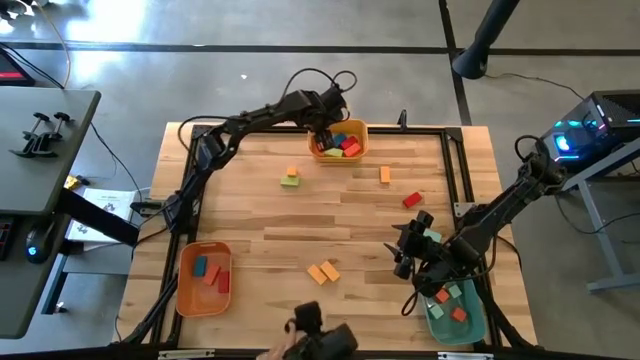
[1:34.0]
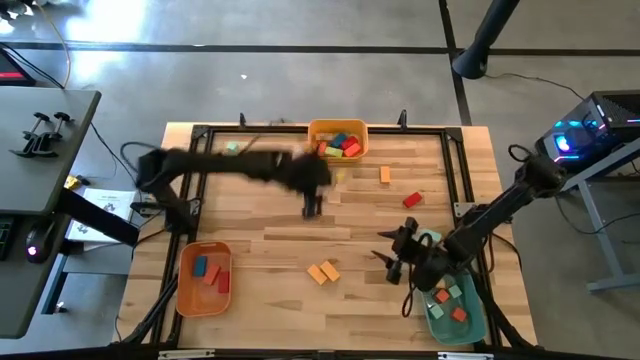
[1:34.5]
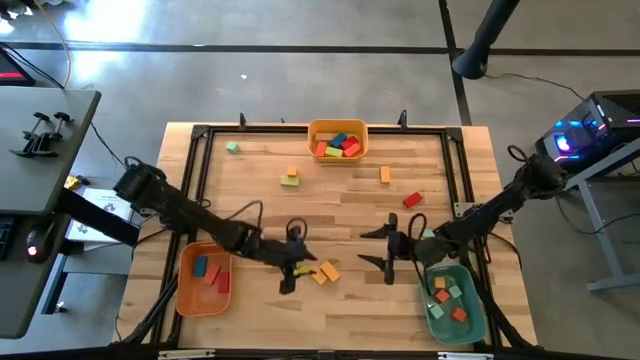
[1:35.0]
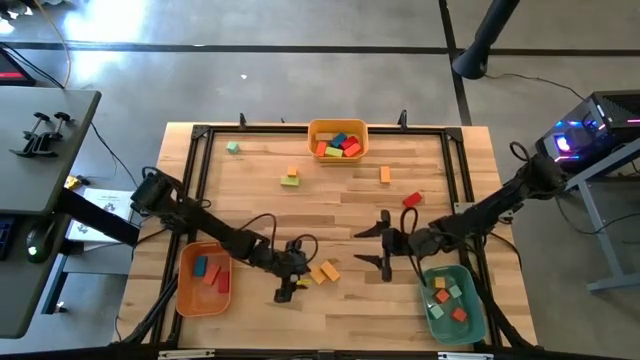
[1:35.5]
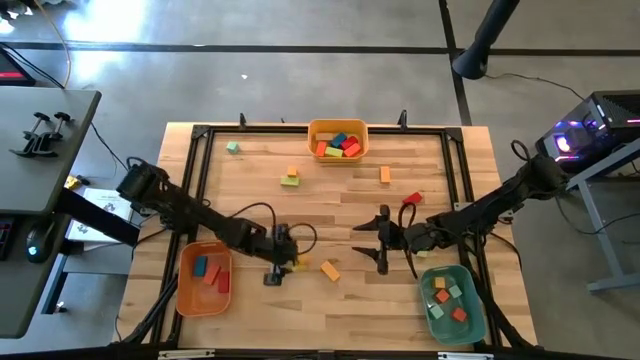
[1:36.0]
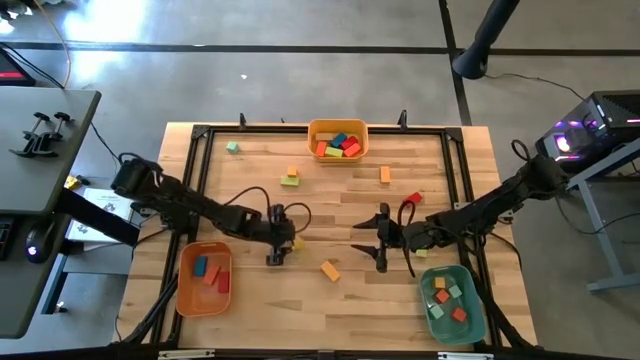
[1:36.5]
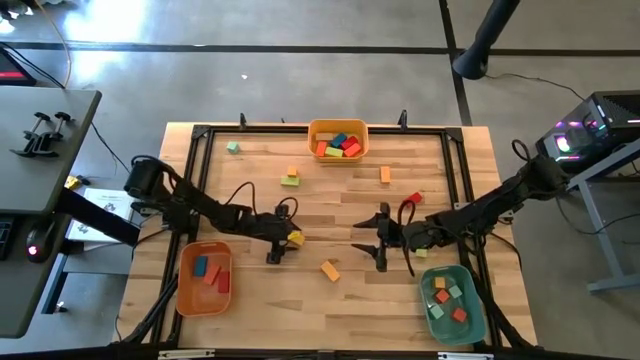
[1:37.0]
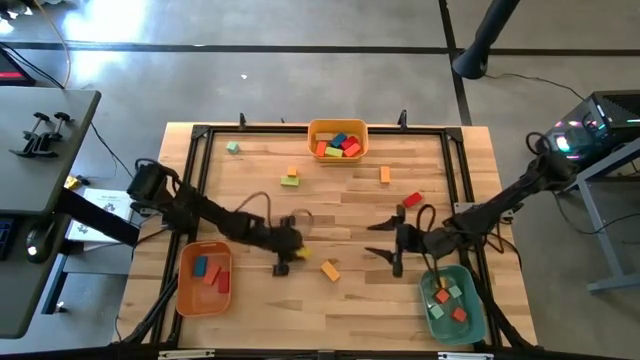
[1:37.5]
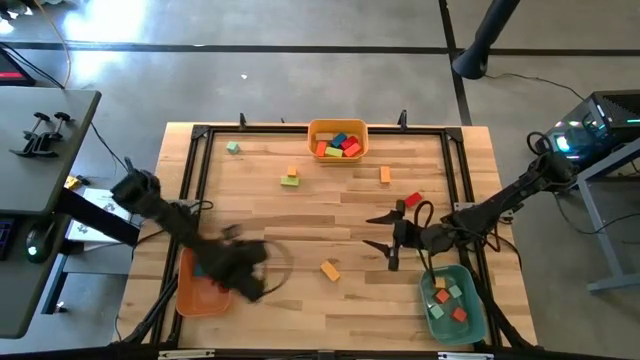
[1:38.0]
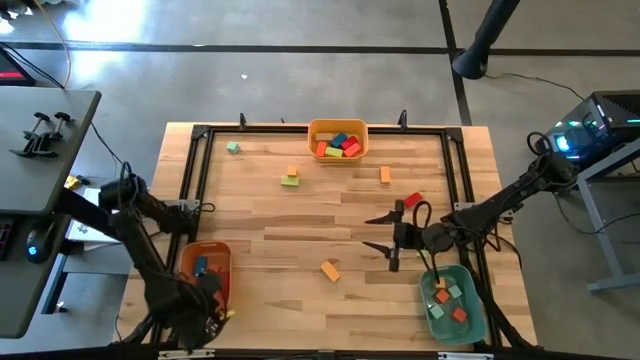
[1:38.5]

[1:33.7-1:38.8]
Task: Sort blocks by size
Put the bottom yellow narrow rectangular block into the orange bin

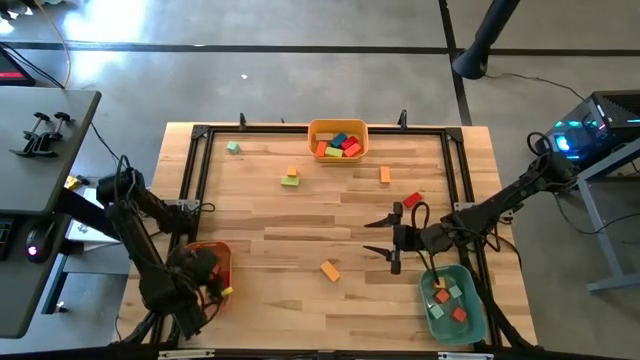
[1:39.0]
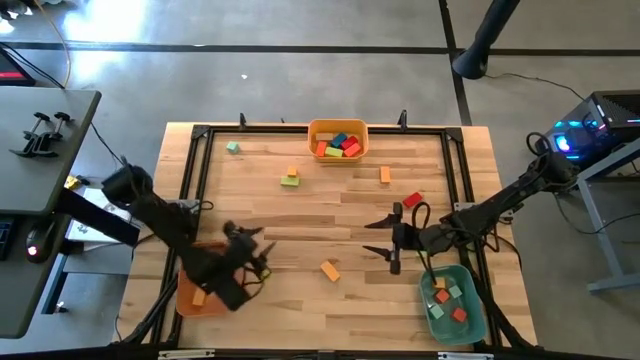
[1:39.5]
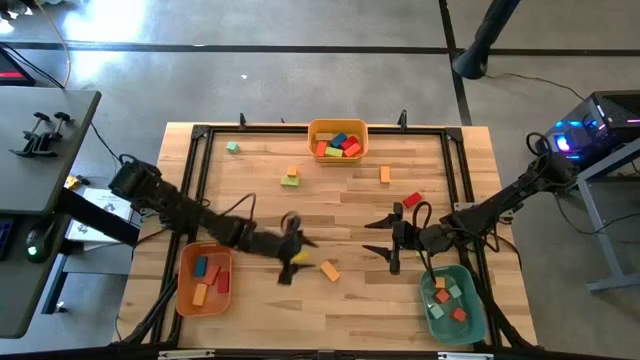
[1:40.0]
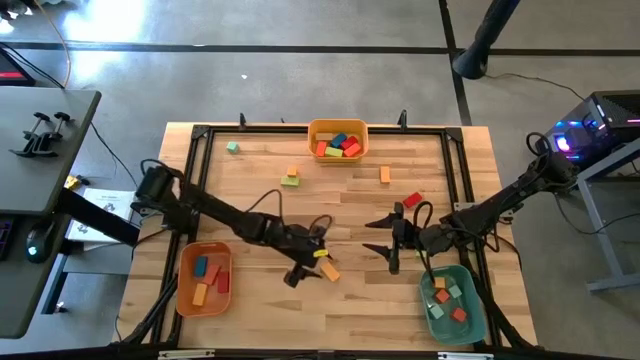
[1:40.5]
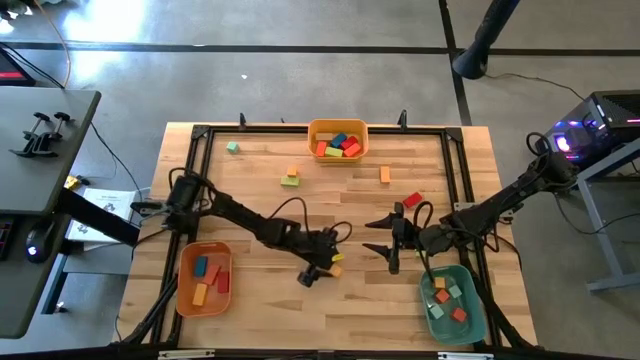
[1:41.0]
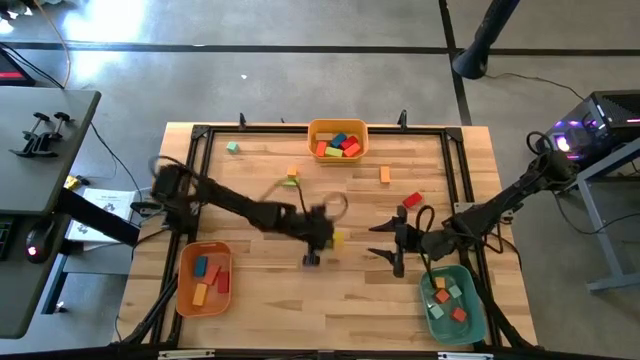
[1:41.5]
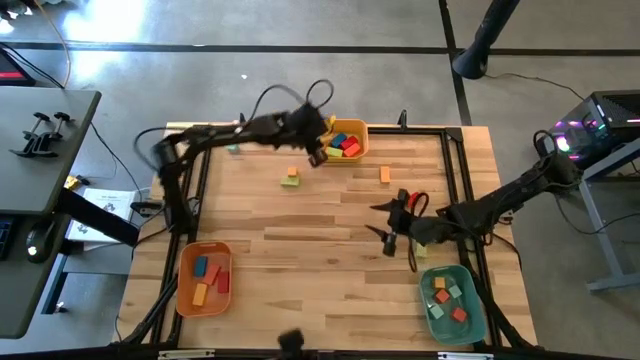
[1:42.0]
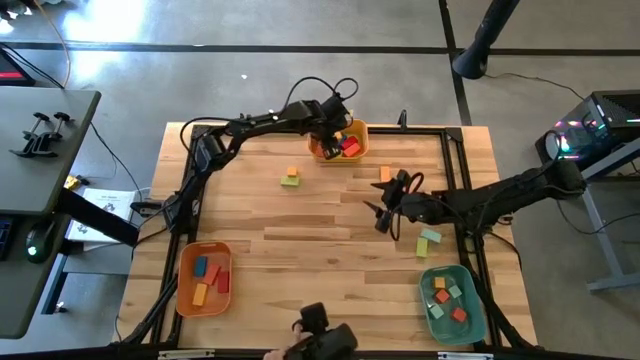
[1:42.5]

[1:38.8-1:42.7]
Put the yellow wide rectangular block into the yellow bin

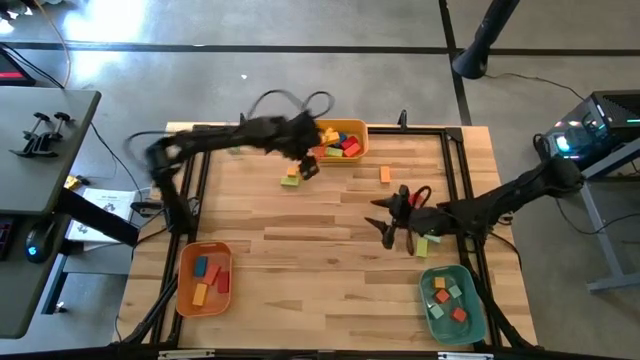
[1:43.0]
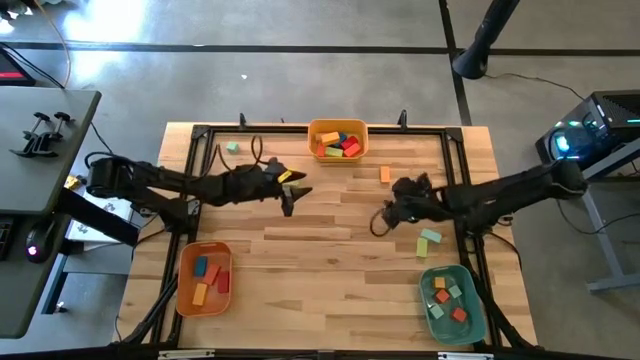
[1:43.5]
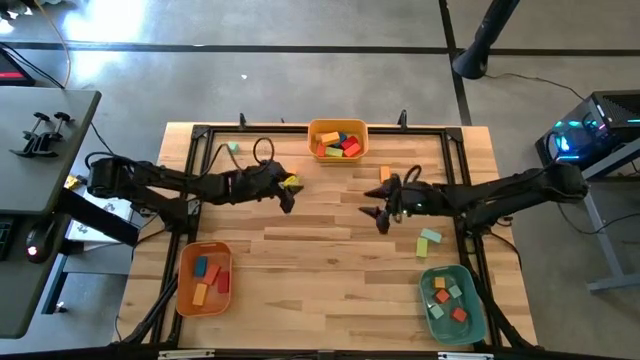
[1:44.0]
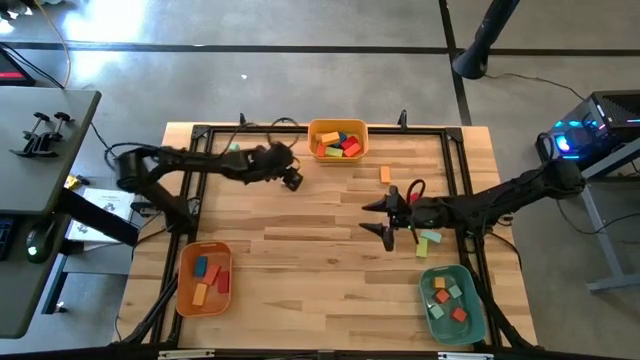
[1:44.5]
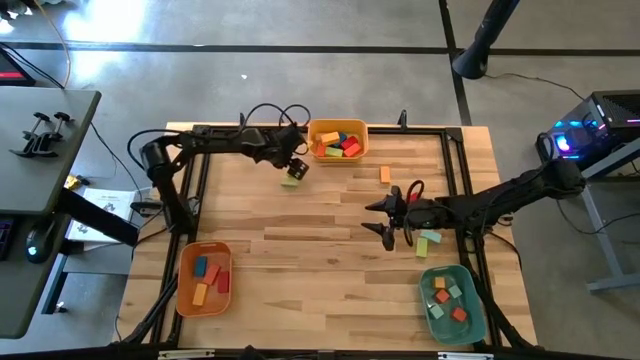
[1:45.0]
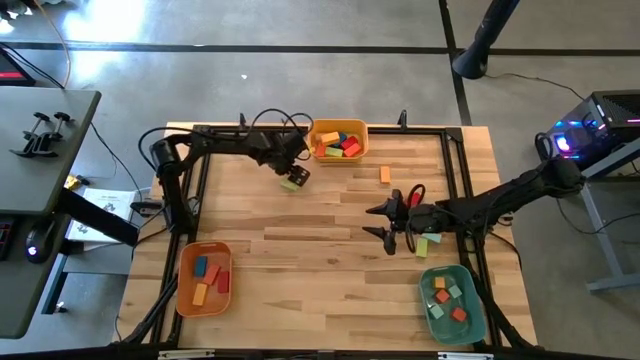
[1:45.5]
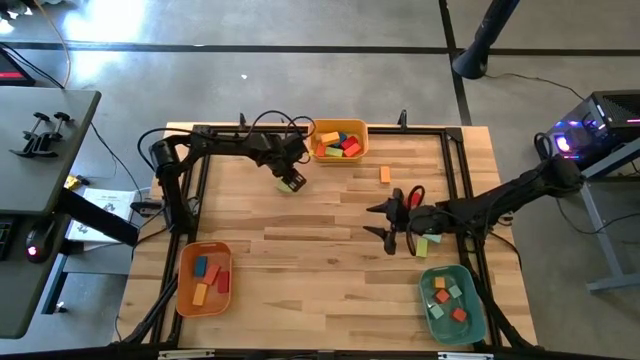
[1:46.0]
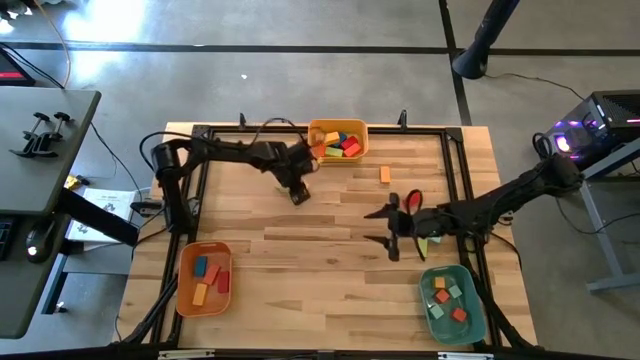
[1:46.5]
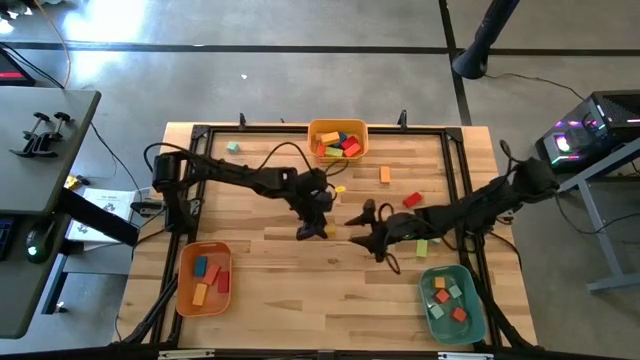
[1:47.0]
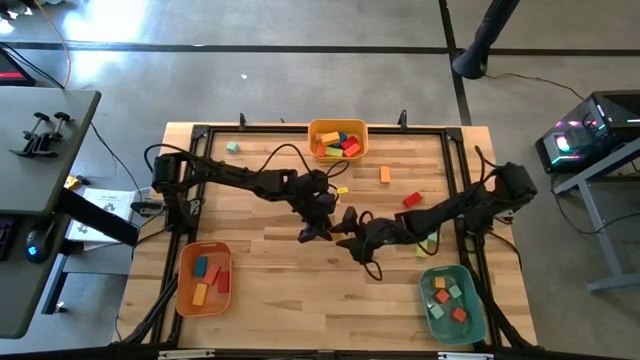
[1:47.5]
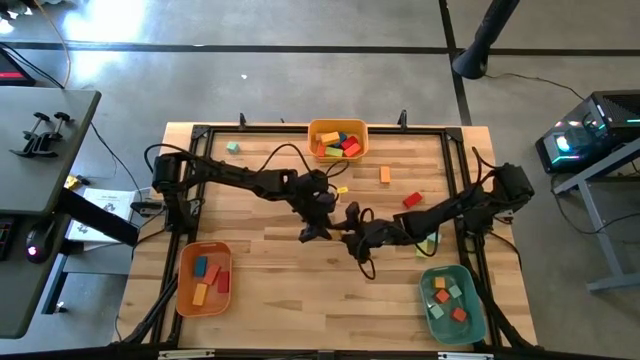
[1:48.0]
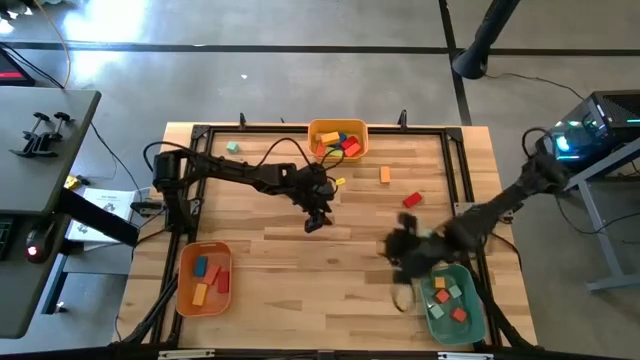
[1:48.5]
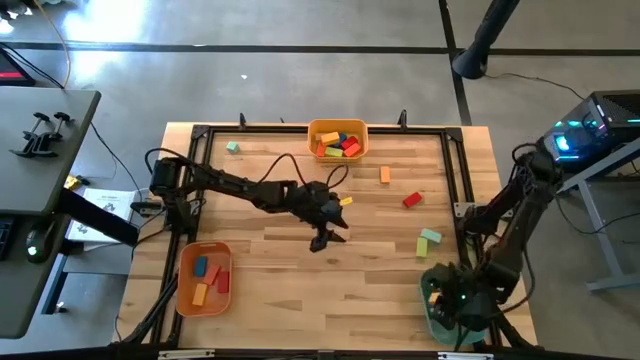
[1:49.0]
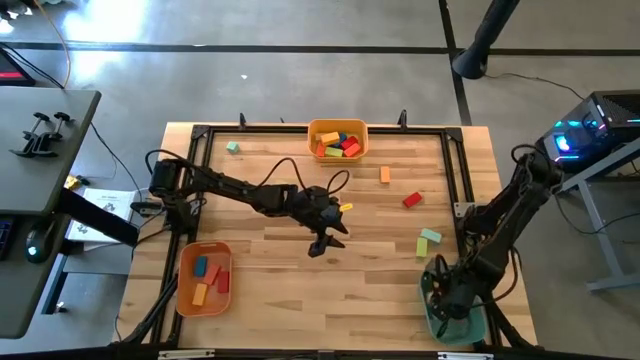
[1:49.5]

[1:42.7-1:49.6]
Put the yellow square block into the blue bin

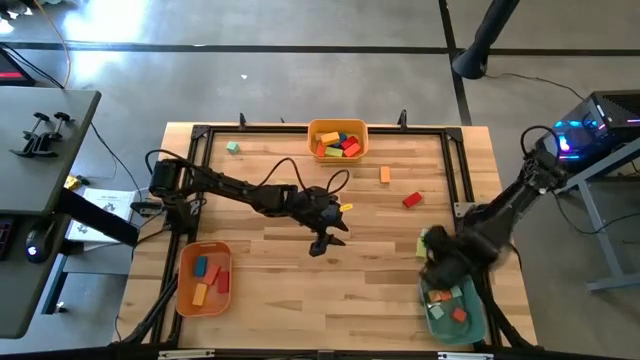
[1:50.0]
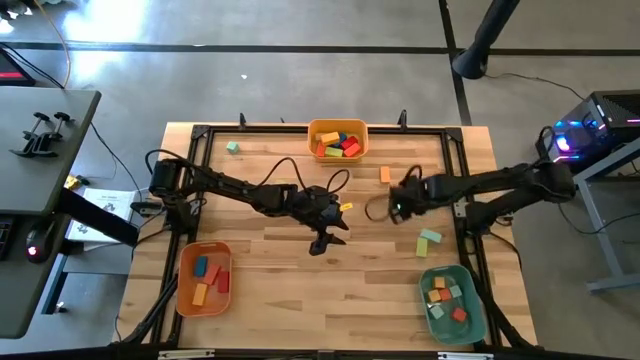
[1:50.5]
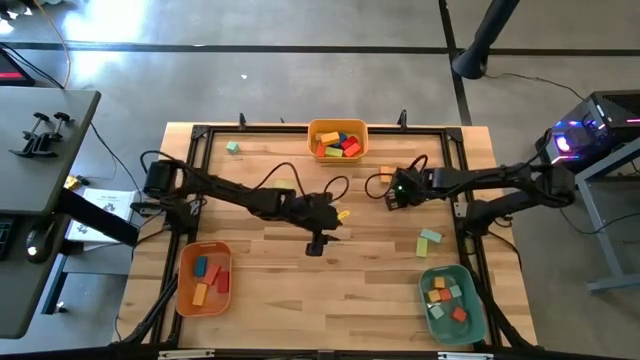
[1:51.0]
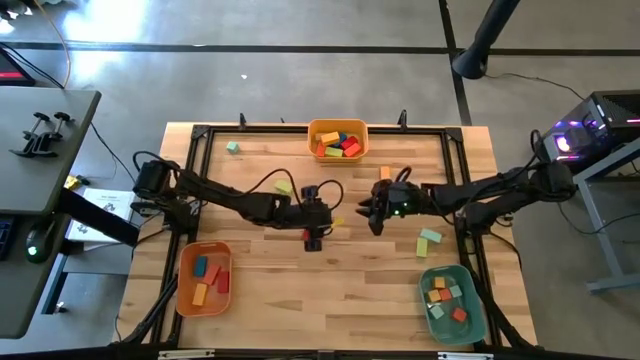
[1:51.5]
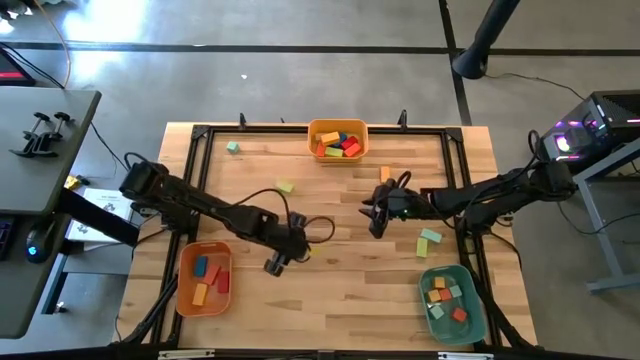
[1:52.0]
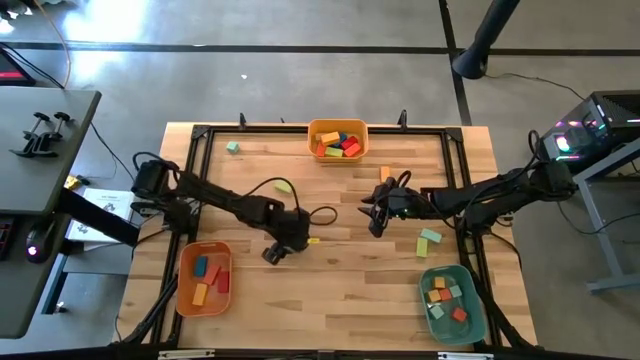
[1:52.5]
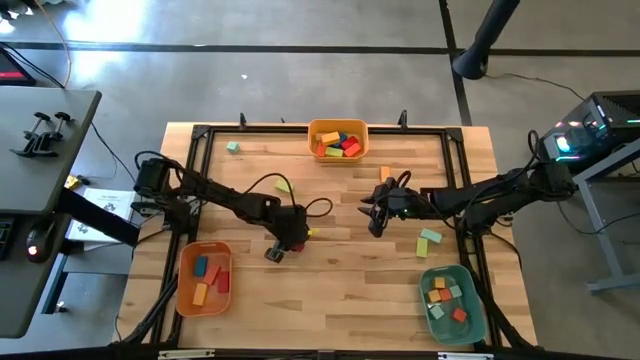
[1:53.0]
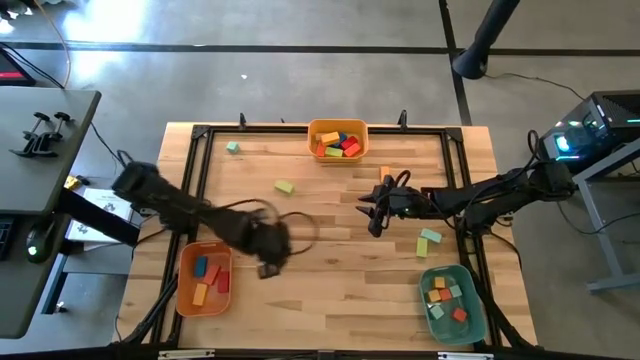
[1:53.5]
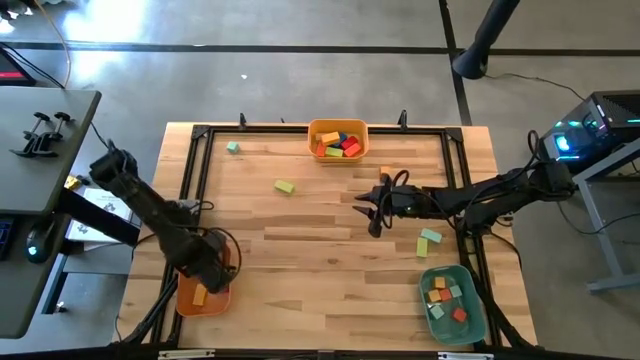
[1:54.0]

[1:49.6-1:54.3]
Put the red narrow rectangular block into the orange bin
